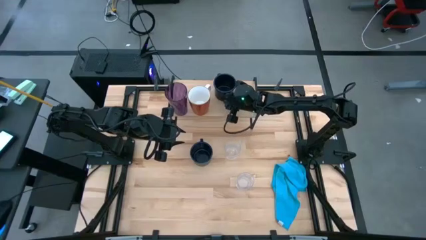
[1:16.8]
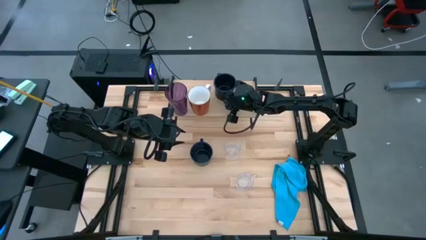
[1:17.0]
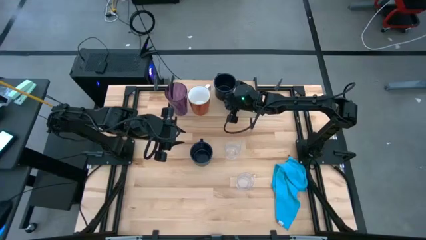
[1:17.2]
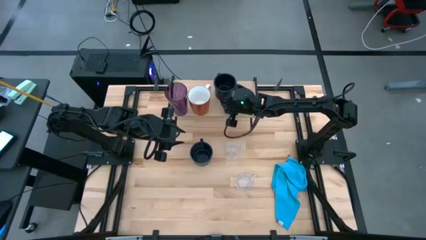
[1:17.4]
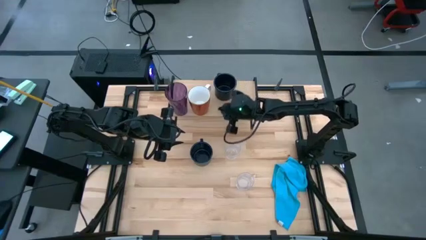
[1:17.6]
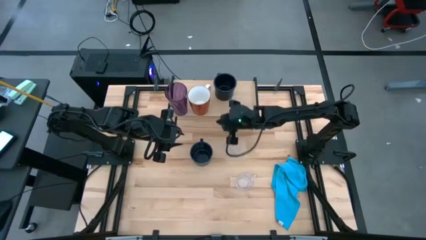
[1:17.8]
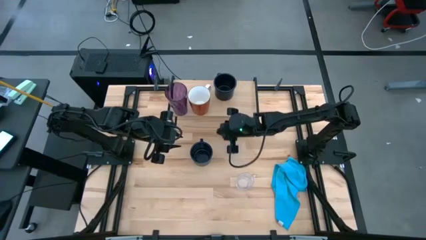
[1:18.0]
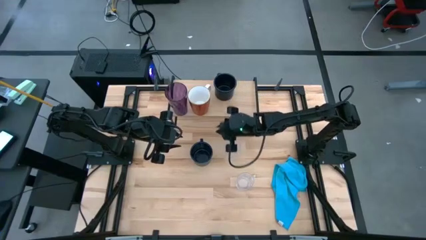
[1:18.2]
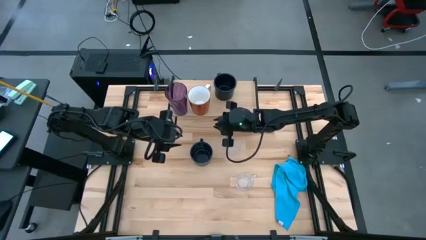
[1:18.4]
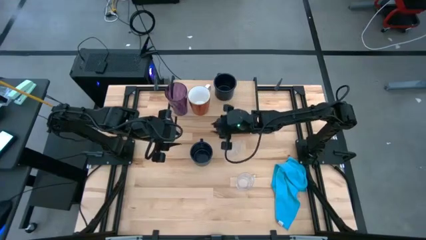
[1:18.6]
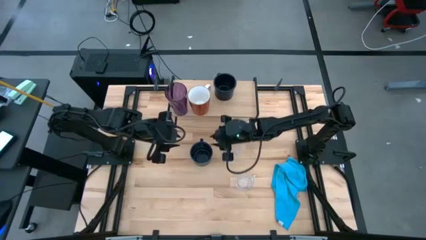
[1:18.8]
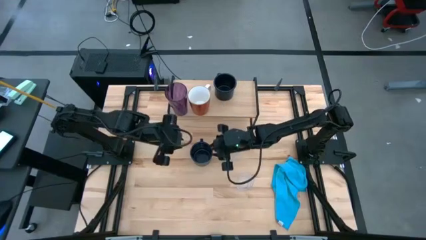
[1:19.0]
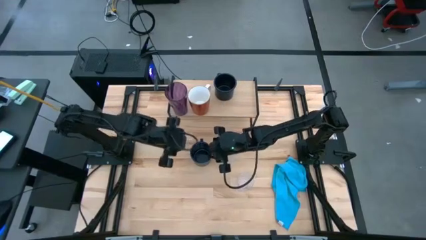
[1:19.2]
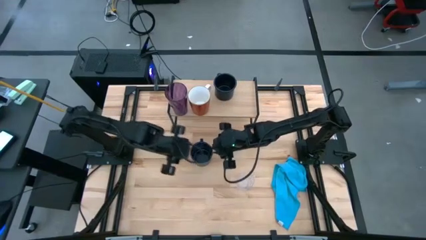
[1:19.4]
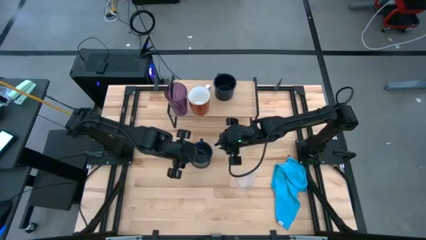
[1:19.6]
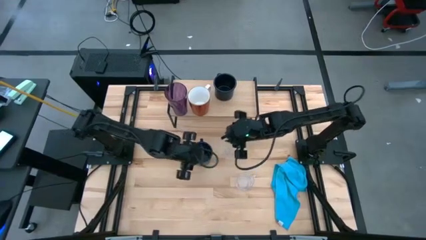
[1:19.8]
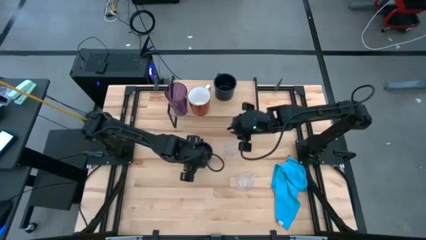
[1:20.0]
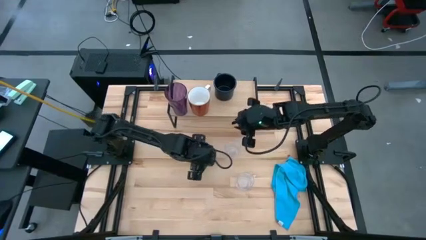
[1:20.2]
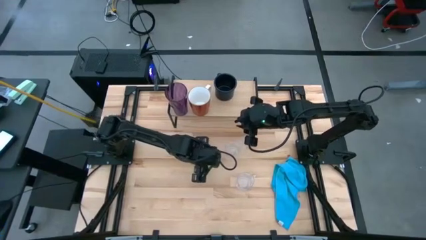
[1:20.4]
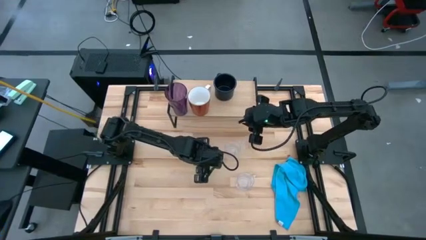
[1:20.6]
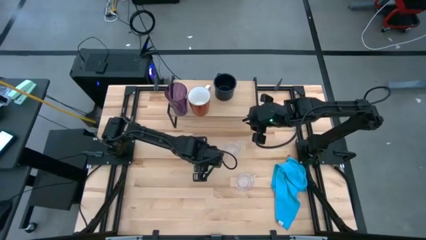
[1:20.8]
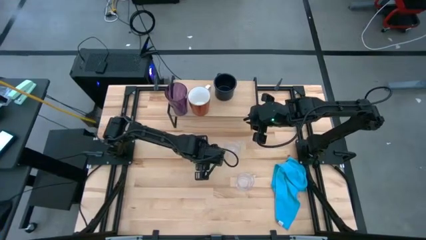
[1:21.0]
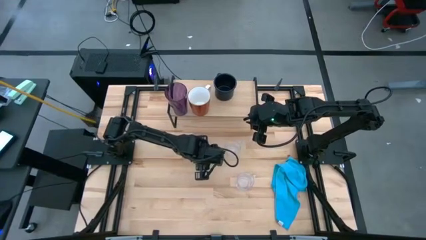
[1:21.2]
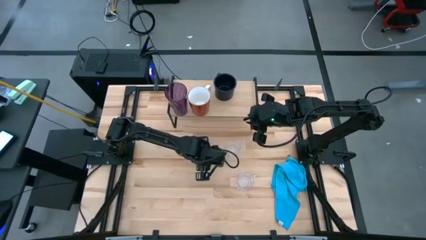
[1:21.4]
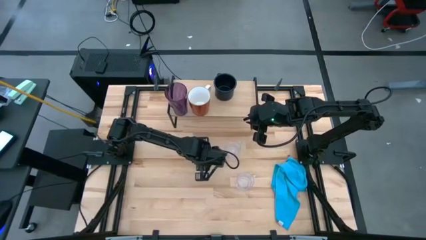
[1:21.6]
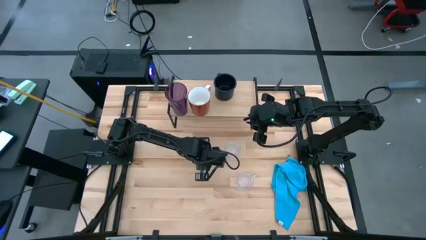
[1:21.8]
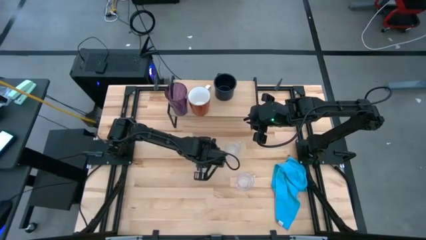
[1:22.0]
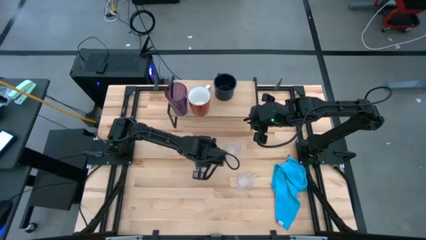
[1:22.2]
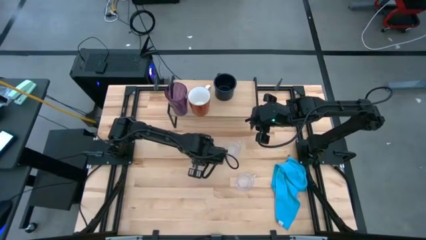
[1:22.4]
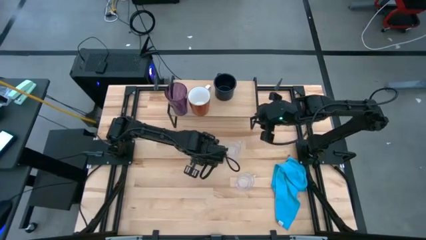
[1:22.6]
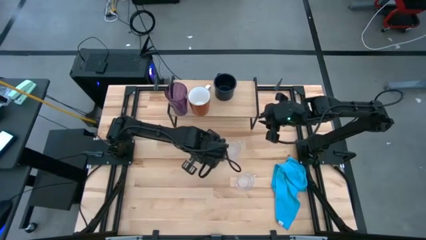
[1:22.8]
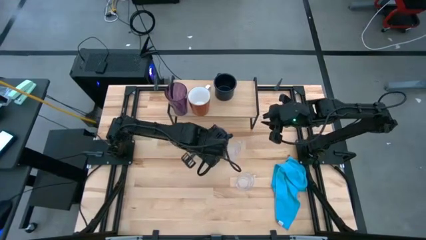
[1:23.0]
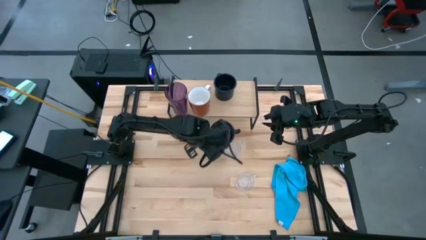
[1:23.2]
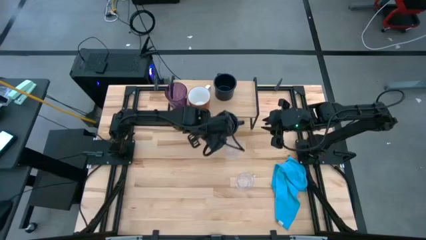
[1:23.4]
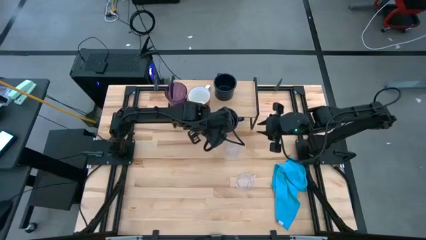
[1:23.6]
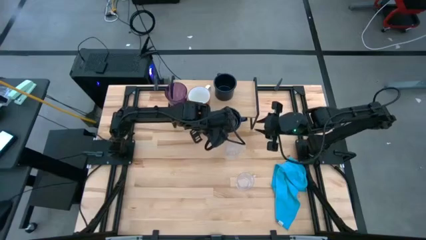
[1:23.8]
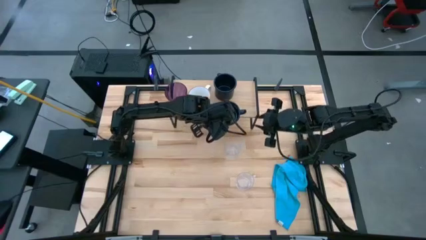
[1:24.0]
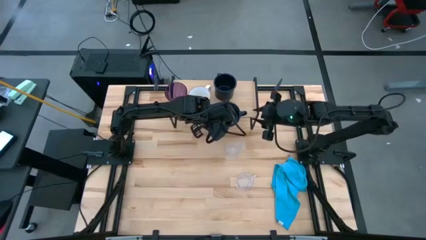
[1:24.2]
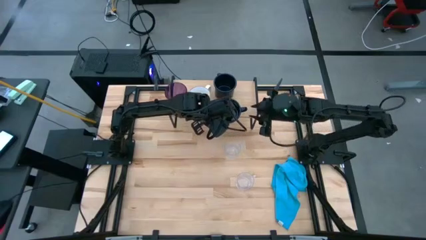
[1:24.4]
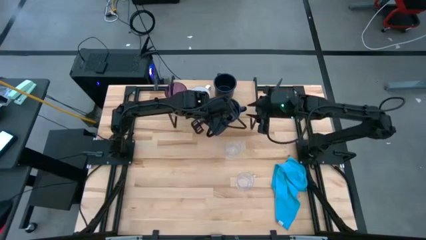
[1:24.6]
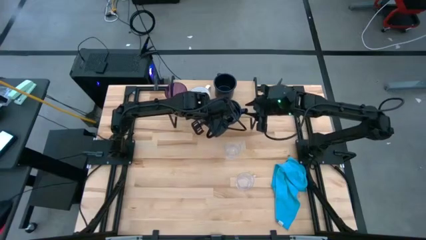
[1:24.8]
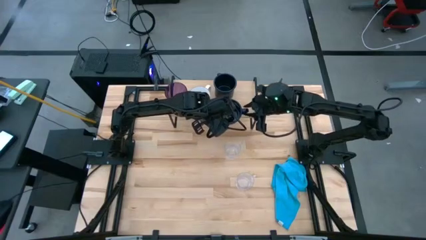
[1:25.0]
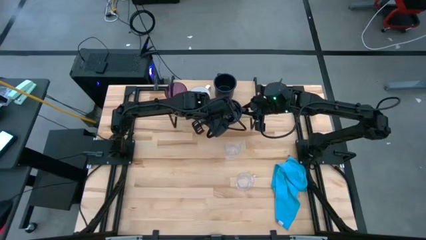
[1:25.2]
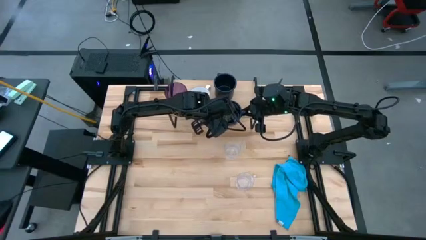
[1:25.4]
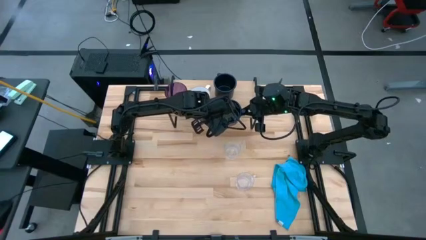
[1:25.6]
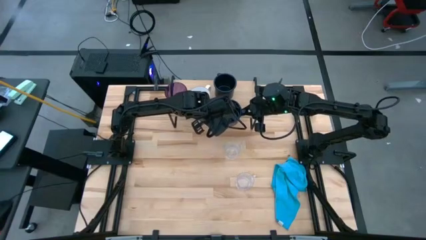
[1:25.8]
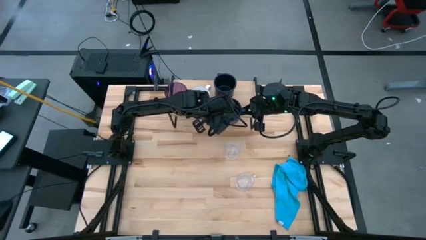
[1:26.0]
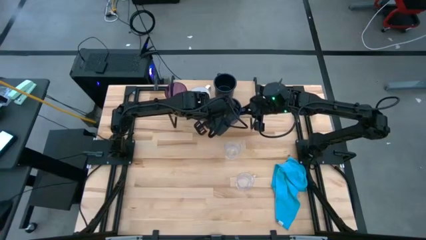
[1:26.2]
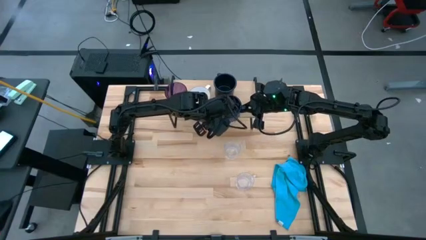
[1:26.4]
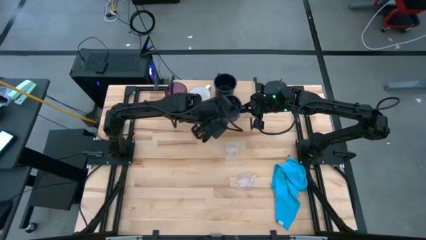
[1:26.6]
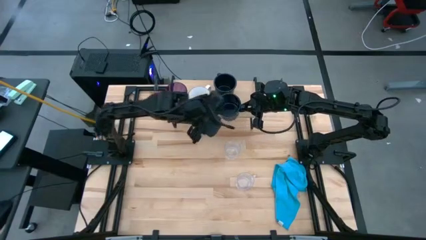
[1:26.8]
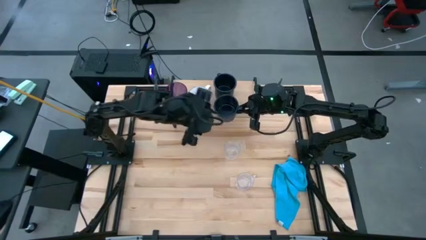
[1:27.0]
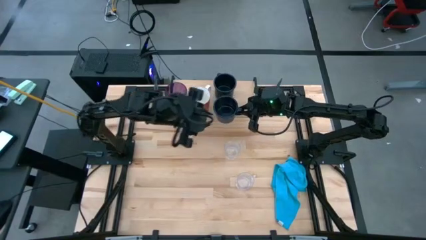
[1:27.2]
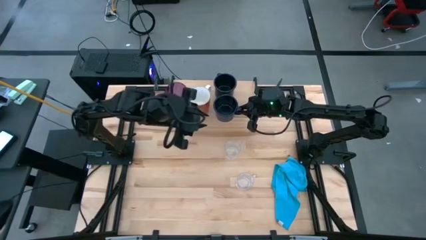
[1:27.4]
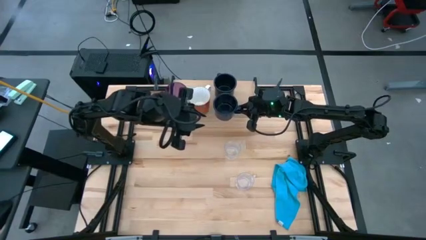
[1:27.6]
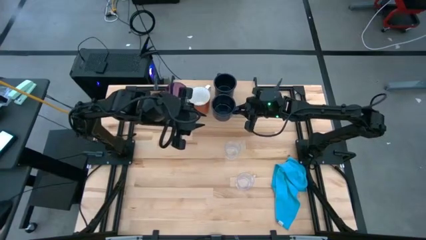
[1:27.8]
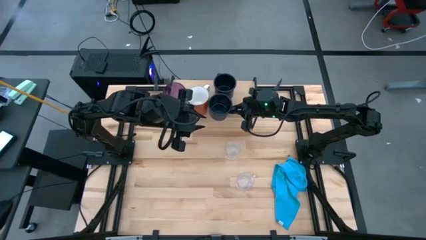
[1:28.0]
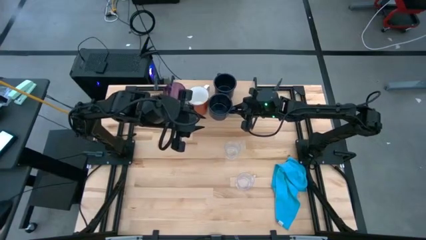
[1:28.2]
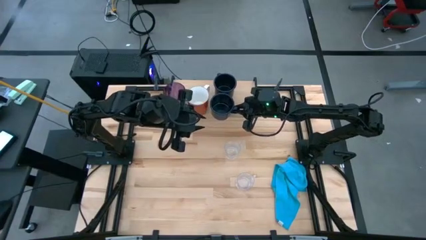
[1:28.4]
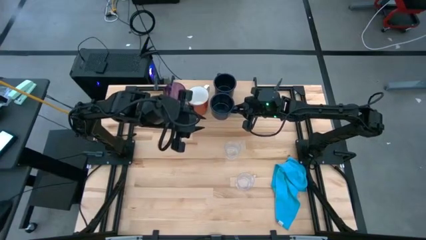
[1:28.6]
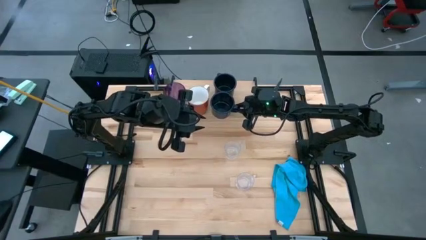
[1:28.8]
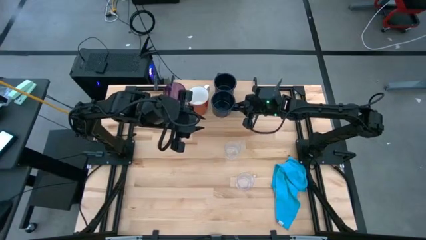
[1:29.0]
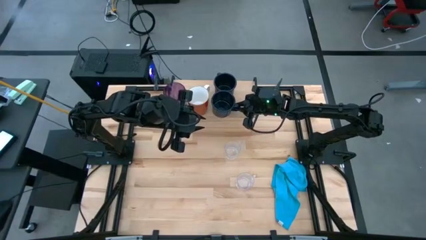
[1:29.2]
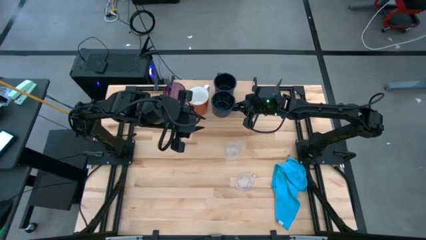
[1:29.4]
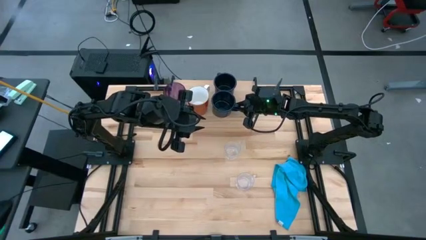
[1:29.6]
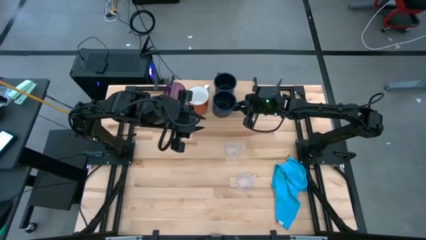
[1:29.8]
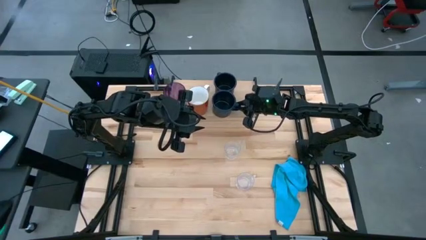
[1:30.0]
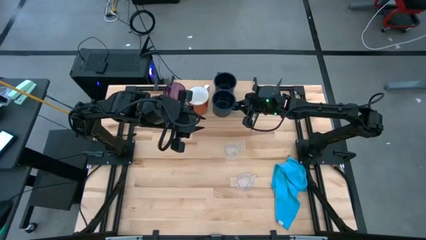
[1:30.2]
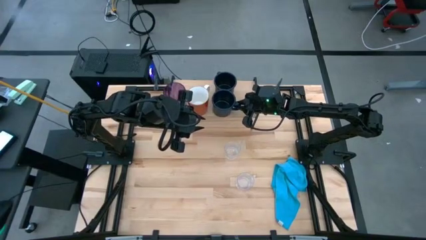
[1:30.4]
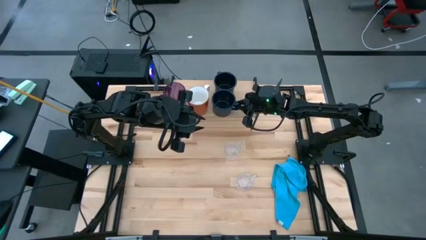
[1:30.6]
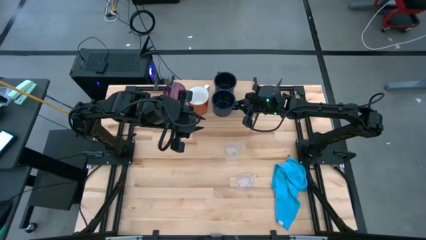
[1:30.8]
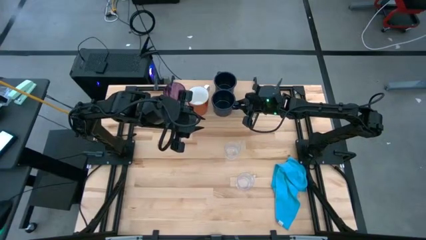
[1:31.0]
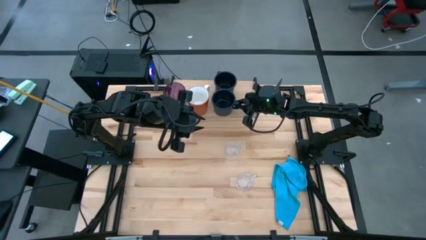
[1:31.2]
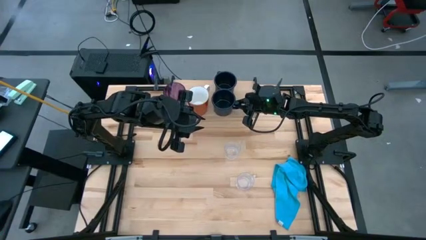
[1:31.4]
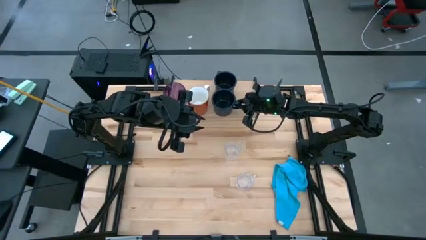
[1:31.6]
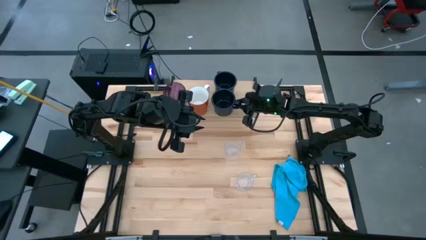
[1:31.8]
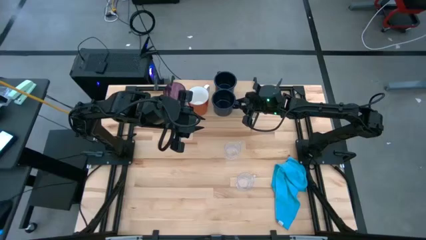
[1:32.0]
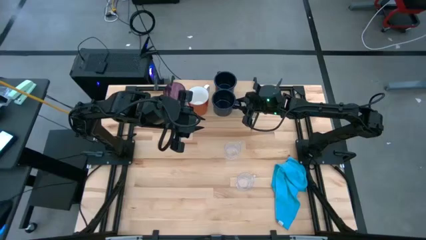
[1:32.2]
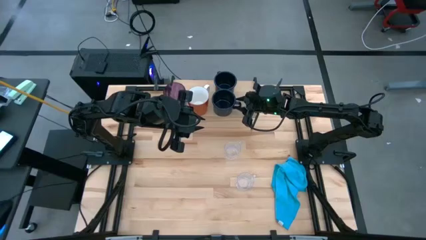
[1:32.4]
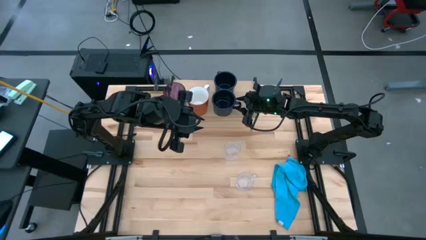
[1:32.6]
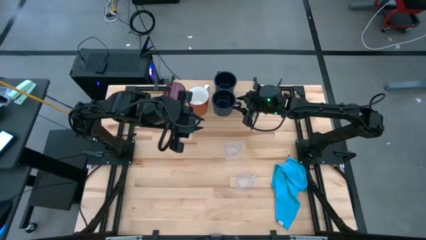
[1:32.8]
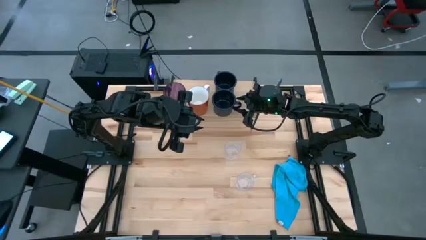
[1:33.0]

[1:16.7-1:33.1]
Task: Stack small to large cups/mugs on shelf
Put the black mug on the shelf aligned with the other black mug
